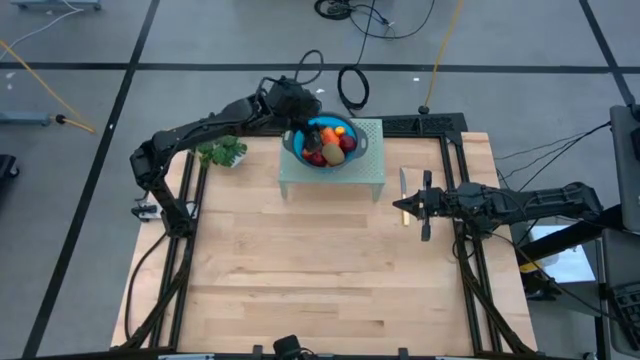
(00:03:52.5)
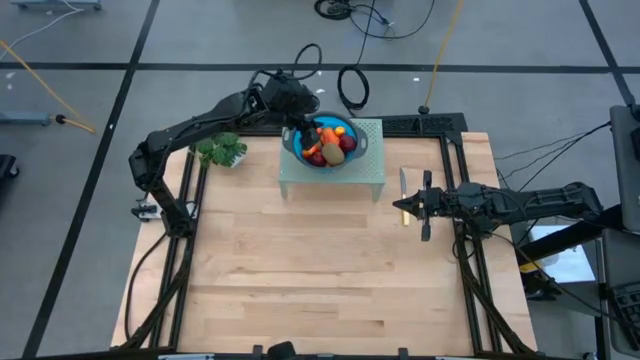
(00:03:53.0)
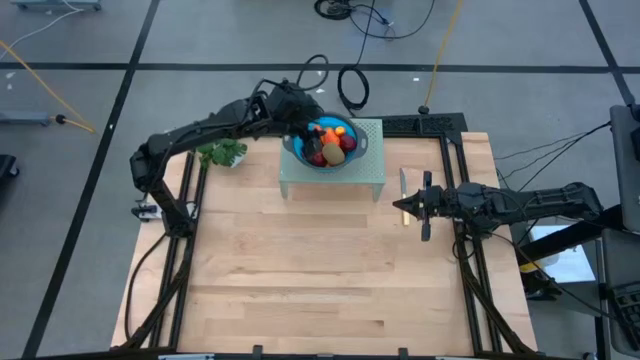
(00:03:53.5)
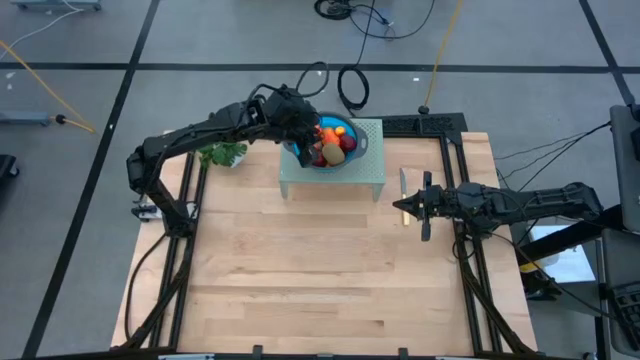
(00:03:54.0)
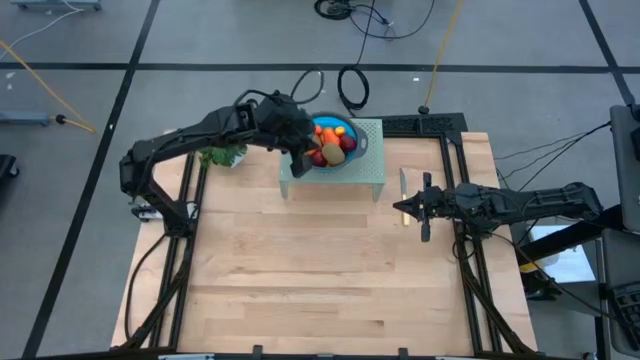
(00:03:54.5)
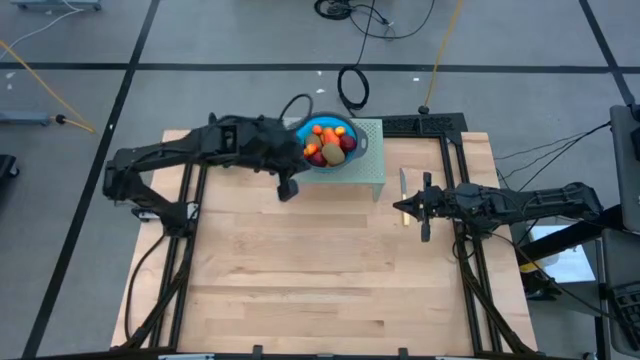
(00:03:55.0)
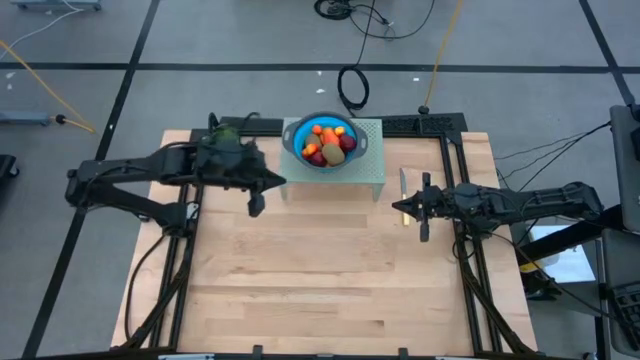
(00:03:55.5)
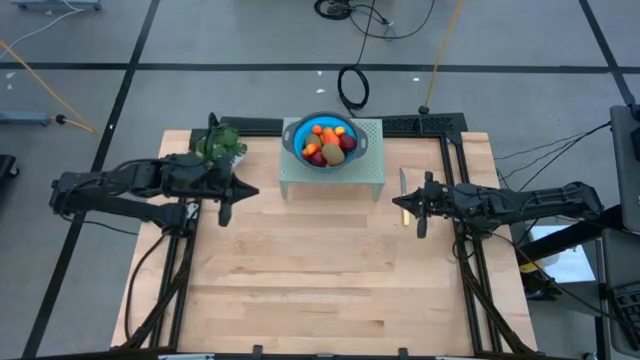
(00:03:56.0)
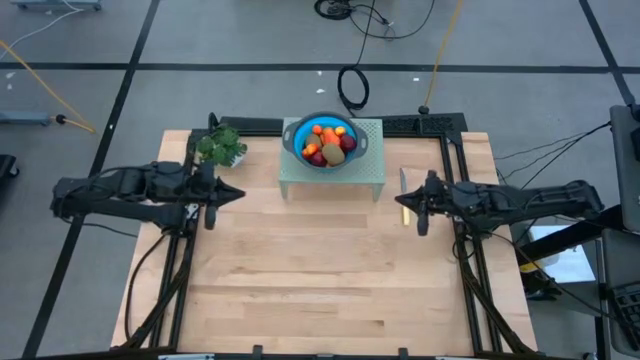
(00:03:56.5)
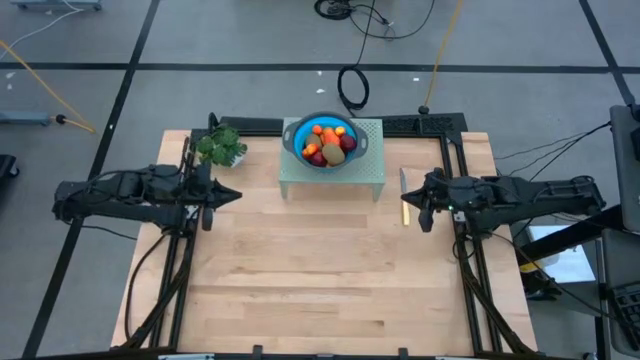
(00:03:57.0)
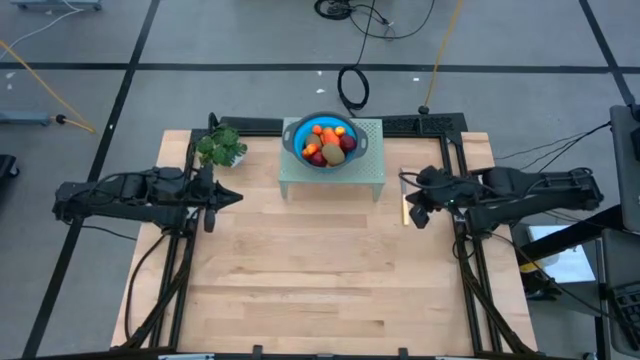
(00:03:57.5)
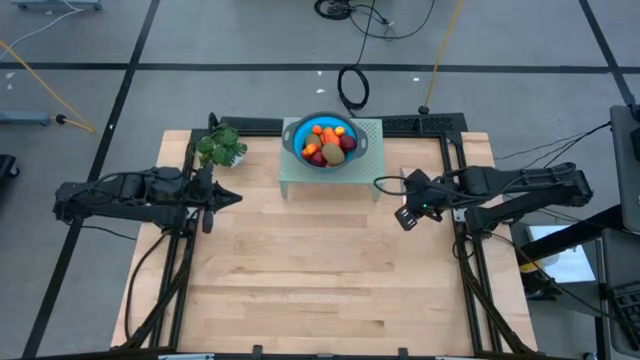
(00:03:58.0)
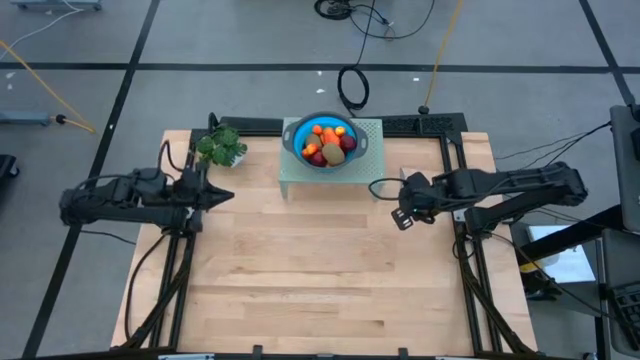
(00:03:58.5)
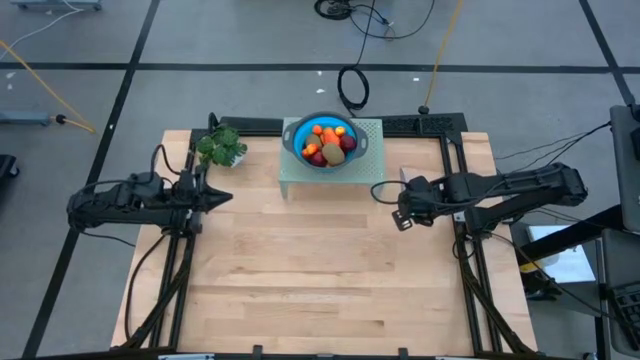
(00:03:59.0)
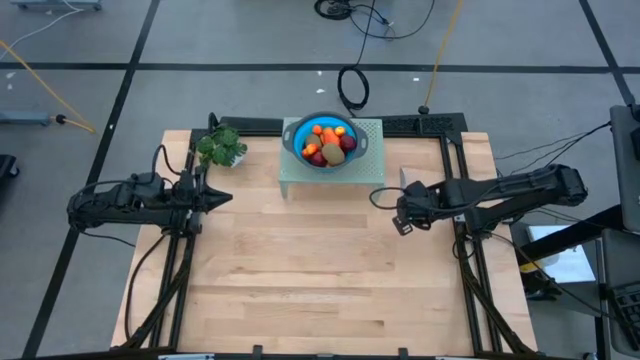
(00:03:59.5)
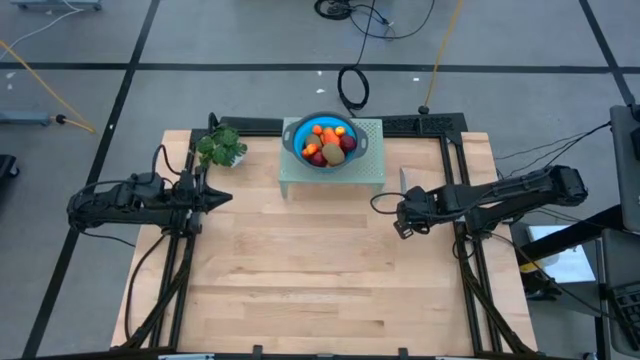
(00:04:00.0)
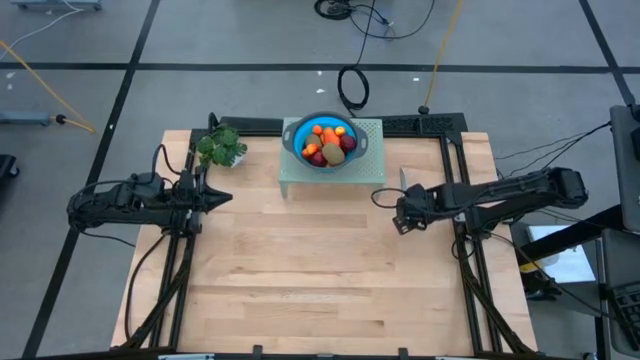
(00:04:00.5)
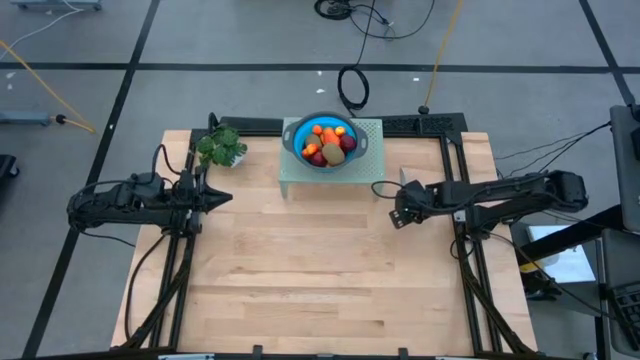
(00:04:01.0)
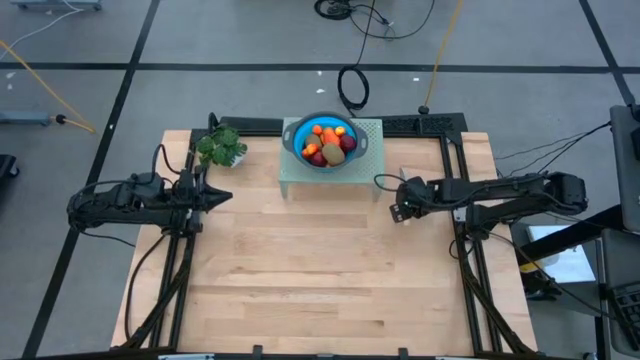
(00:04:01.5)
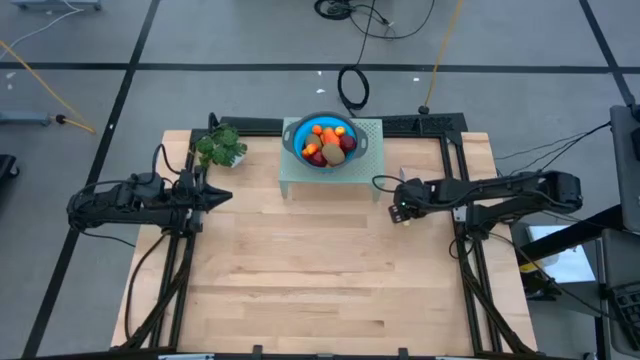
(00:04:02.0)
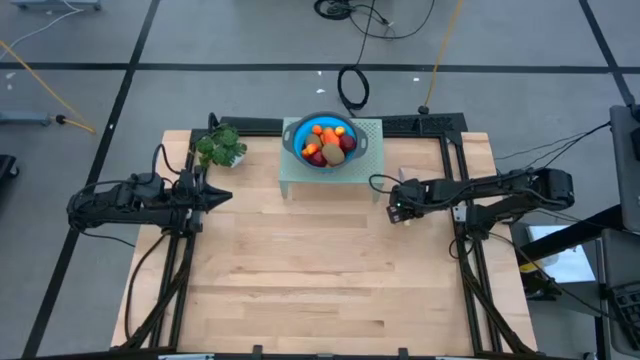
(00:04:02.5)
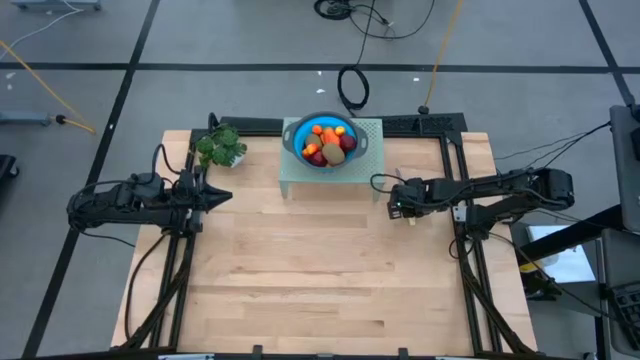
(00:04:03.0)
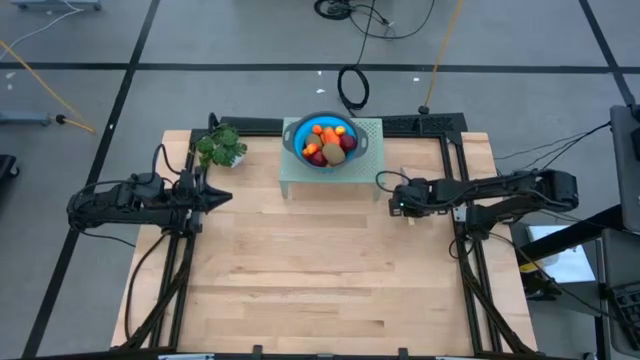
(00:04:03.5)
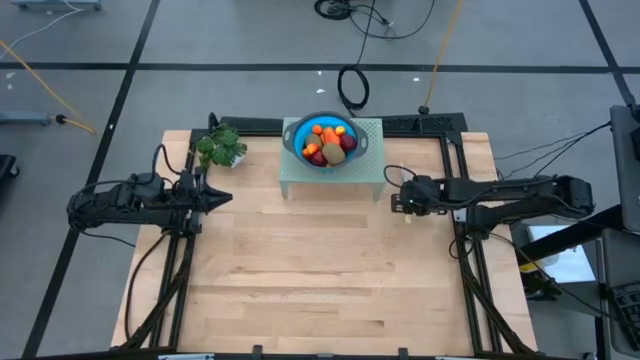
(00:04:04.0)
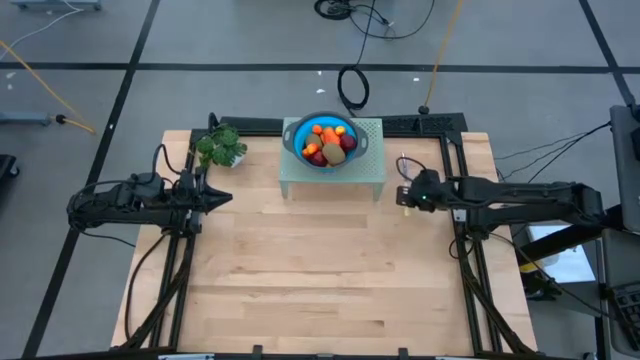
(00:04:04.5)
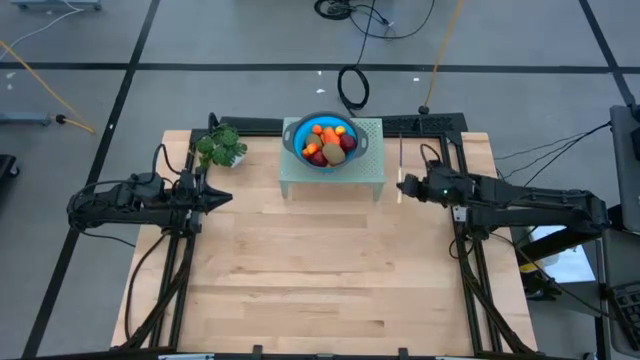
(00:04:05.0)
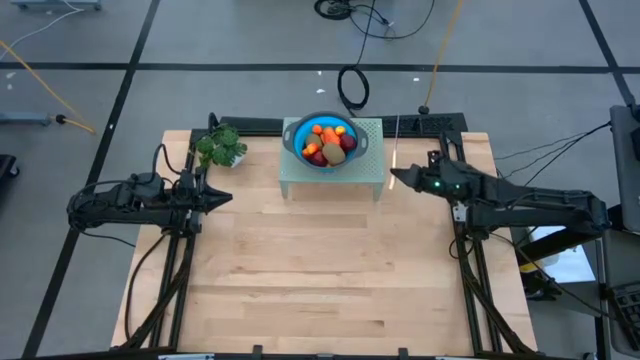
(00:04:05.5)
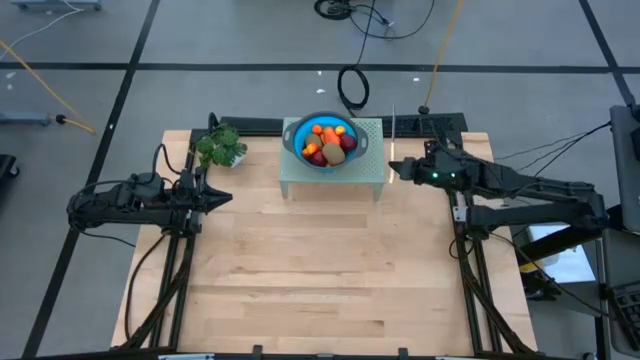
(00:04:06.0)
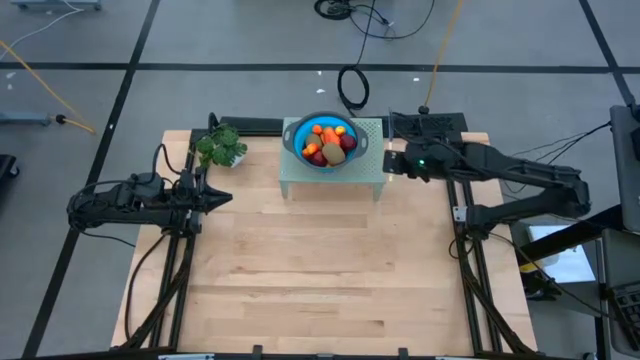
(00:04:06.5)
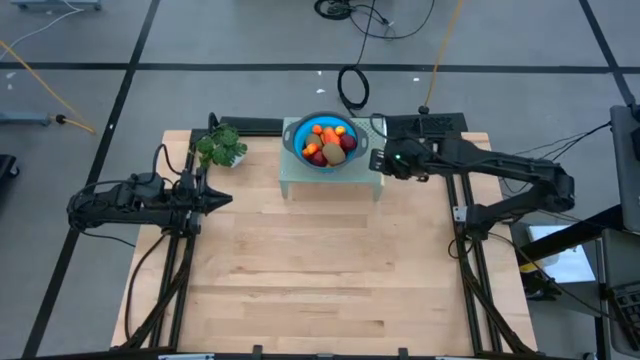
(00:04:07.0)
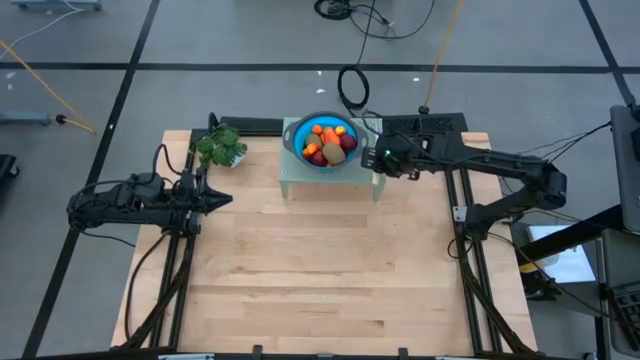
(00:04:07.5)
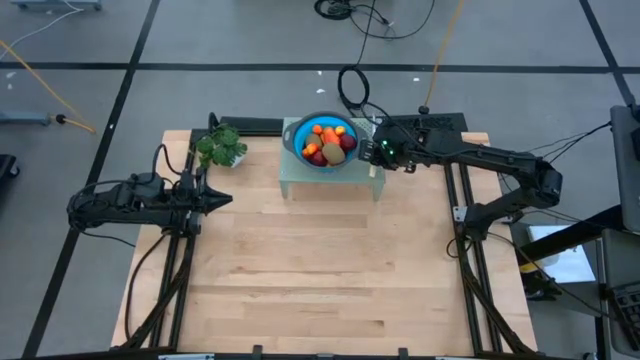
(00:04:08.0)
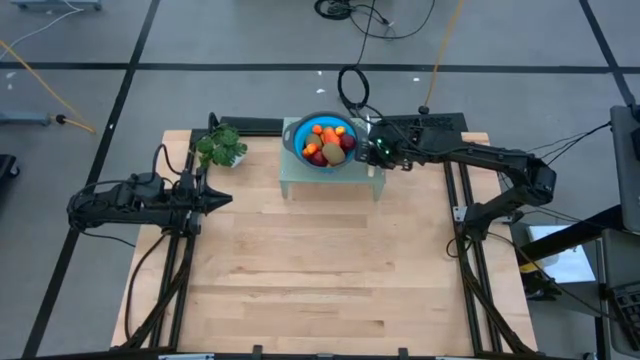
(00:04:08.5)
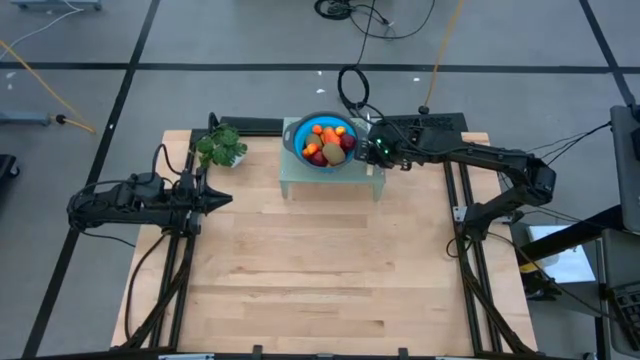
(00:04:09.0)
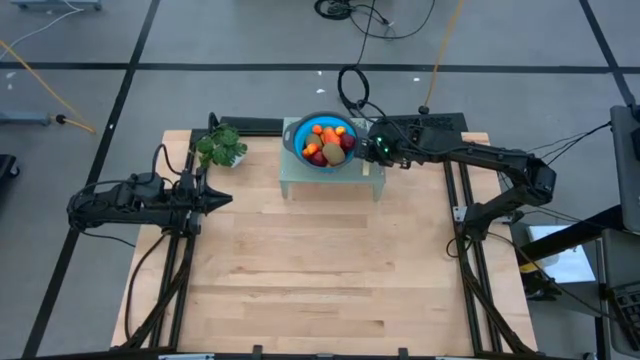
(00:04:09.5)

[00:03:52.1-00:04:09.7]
Task: Pick & Place Fruit
Put the table knife on the shelf

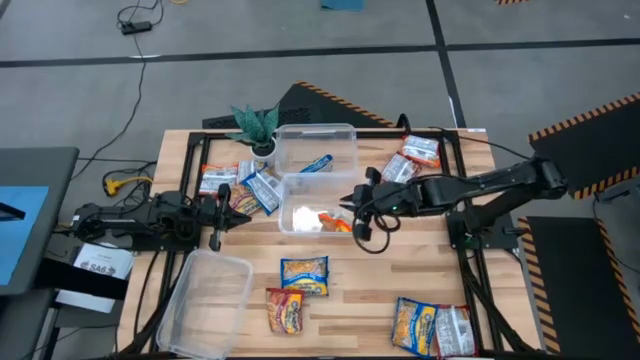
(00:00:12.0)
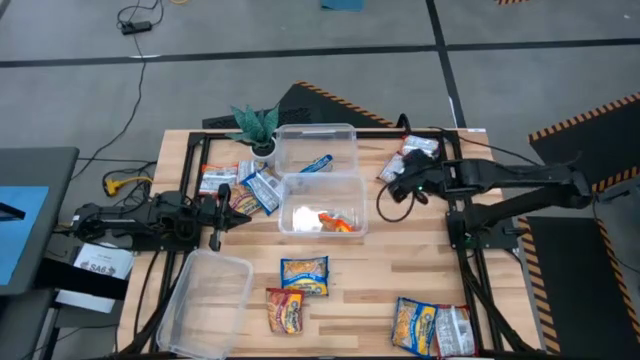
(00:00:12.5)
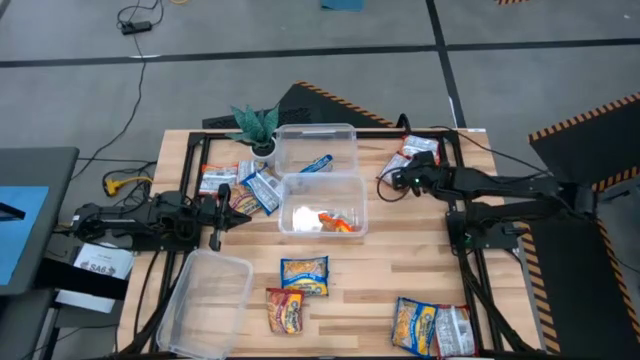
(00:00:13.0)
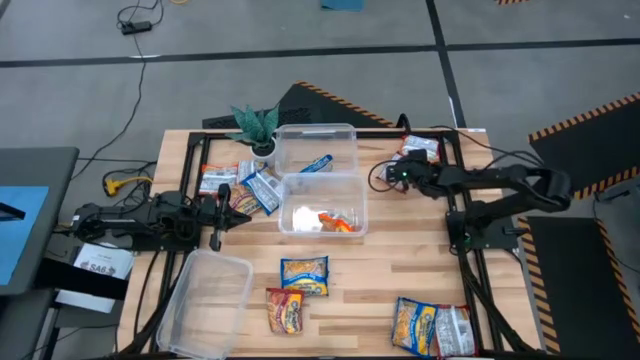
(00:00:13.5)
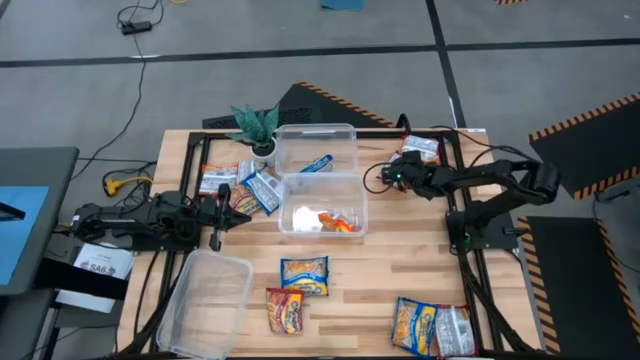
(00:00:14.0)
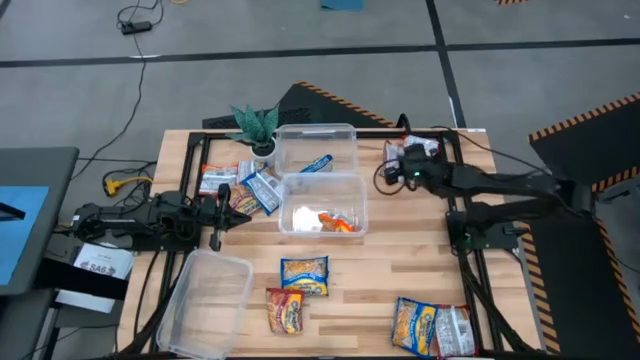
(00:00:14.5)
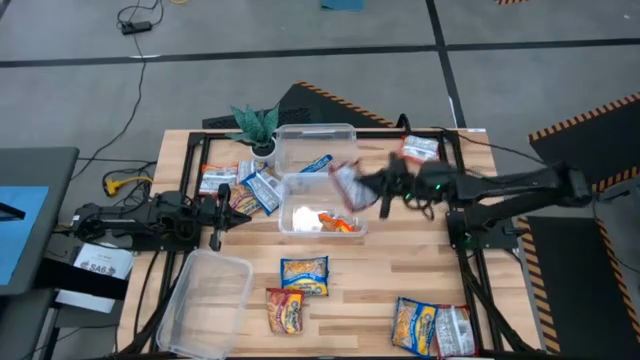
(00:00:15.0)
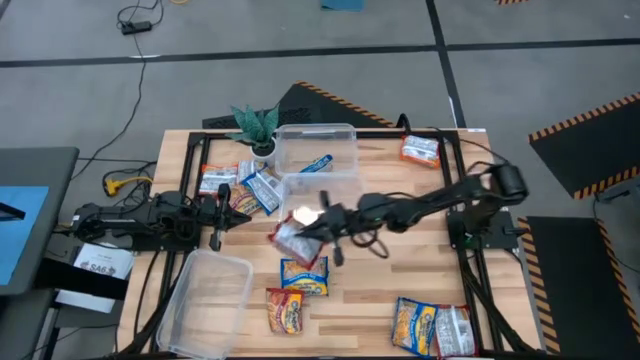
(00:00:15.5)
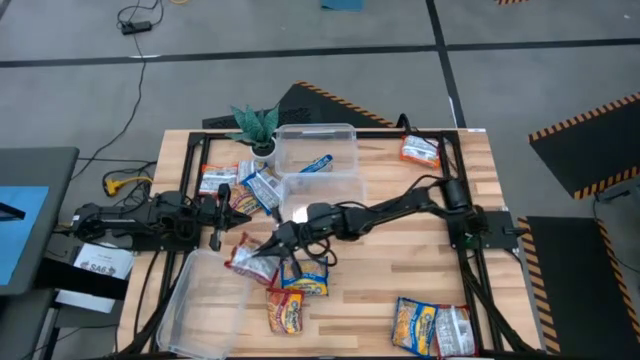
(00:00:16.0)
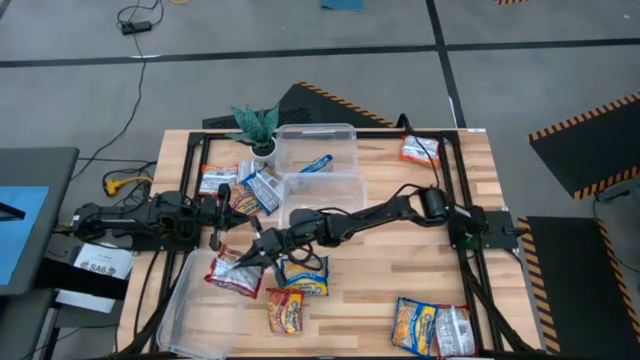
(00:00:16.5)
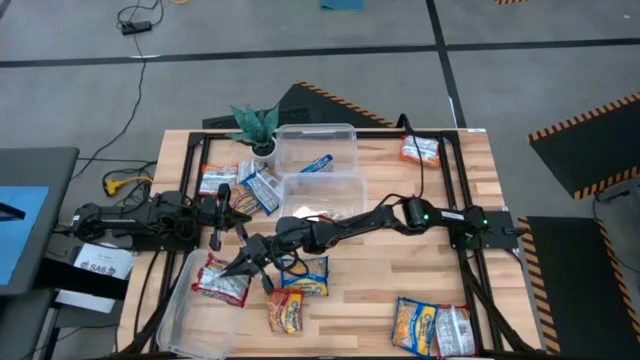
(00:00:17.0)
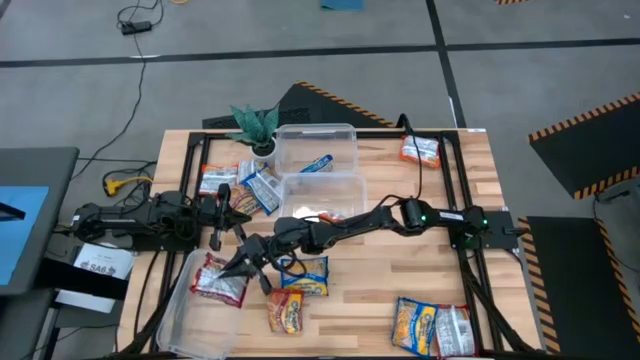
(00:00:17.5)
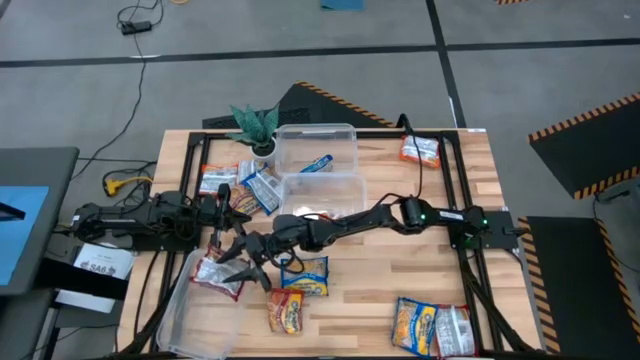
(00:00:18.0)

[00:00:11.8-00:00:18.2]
Task: Sort Maruchan noodles
Put the red noodle pack into the bottom transparent bin
